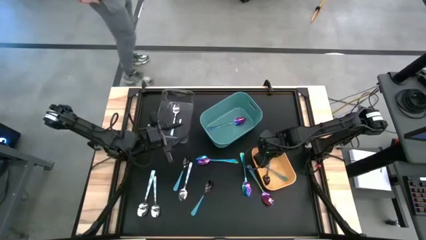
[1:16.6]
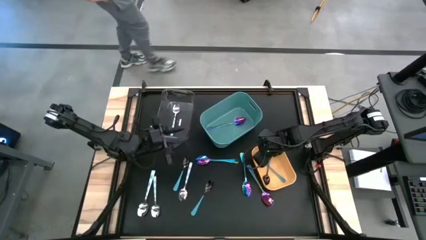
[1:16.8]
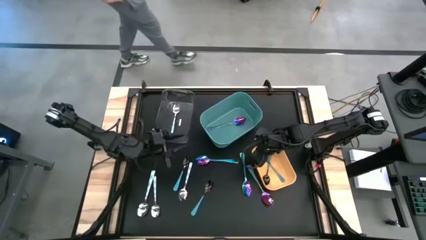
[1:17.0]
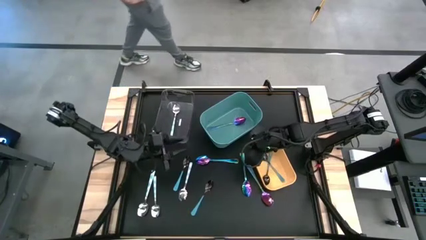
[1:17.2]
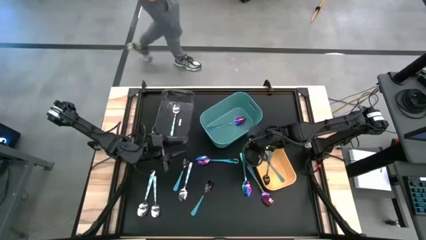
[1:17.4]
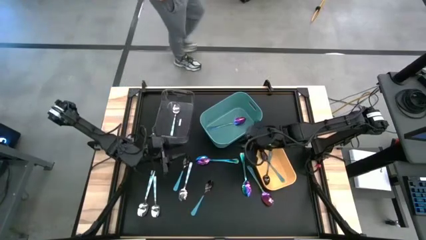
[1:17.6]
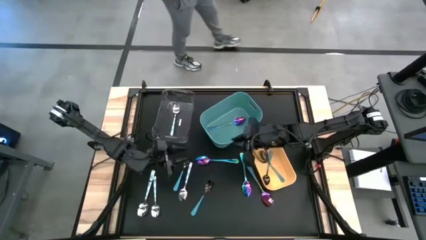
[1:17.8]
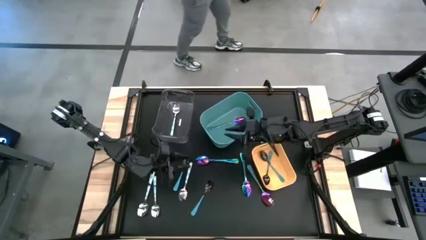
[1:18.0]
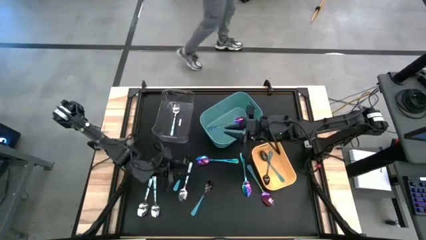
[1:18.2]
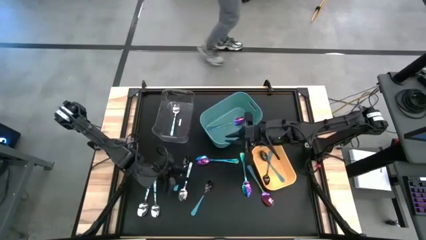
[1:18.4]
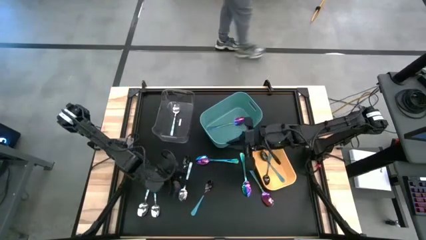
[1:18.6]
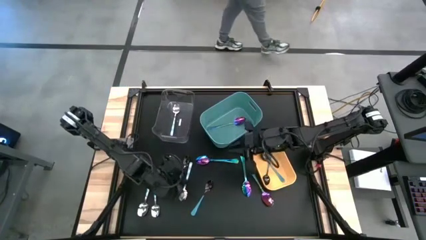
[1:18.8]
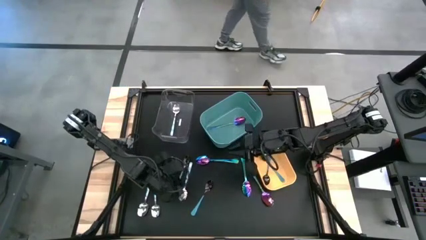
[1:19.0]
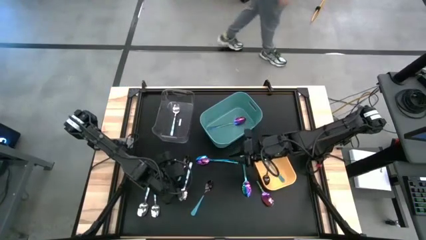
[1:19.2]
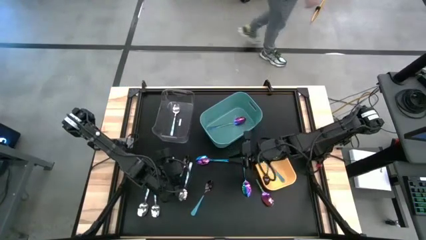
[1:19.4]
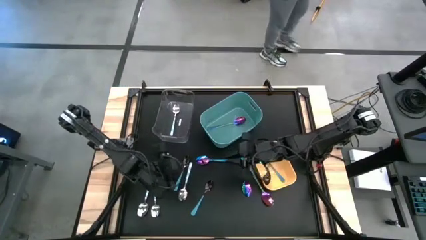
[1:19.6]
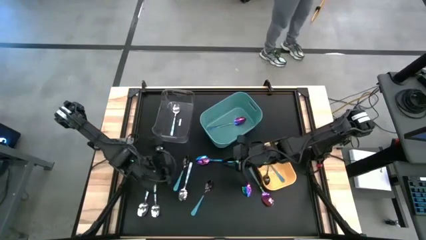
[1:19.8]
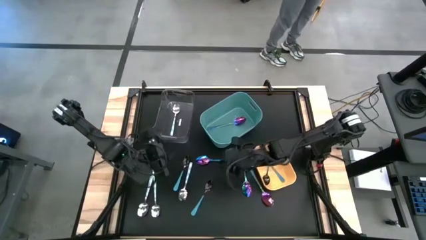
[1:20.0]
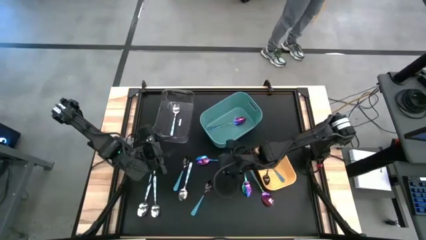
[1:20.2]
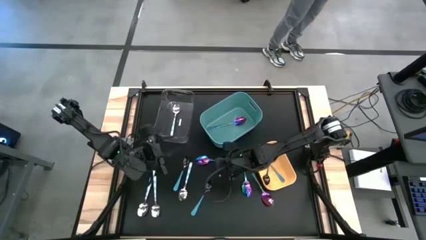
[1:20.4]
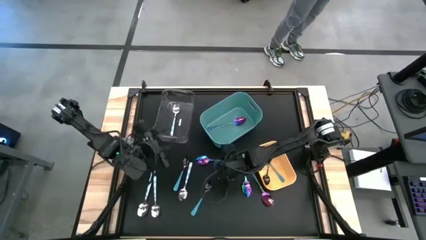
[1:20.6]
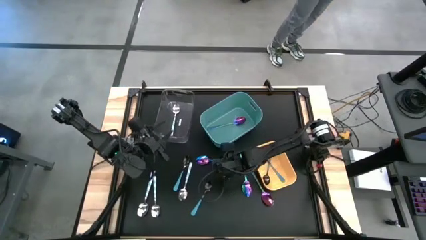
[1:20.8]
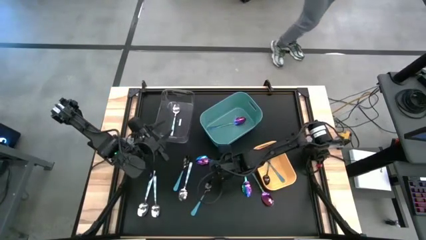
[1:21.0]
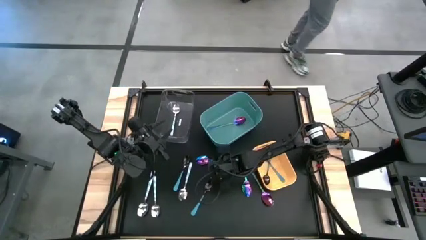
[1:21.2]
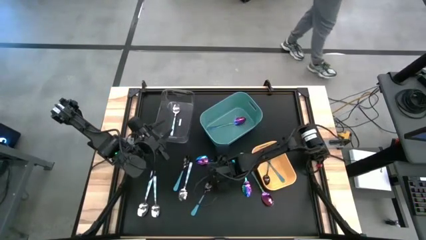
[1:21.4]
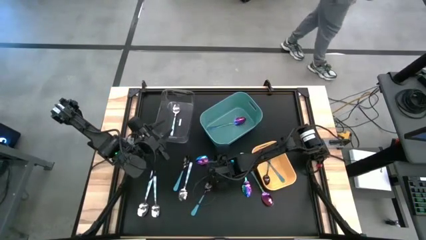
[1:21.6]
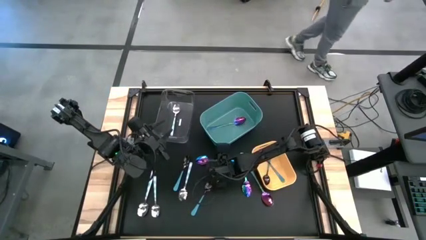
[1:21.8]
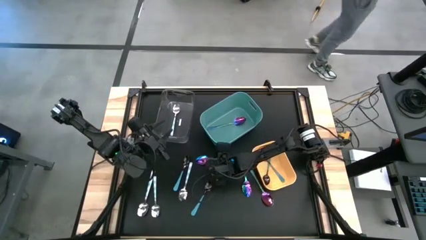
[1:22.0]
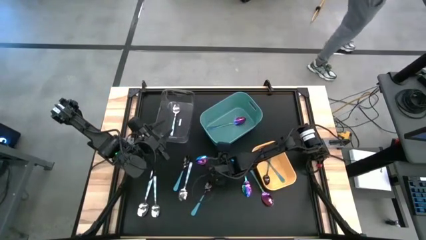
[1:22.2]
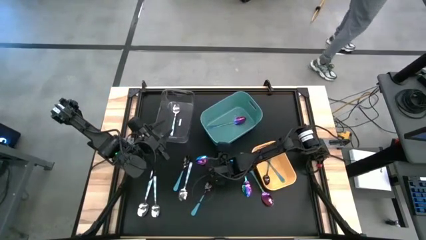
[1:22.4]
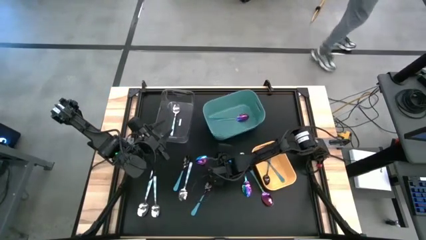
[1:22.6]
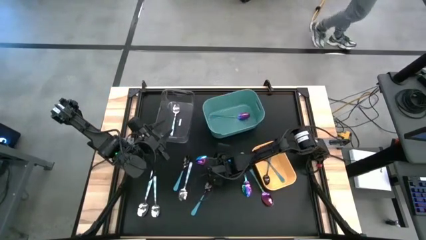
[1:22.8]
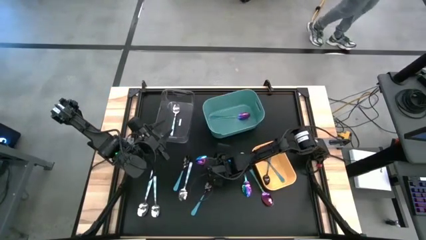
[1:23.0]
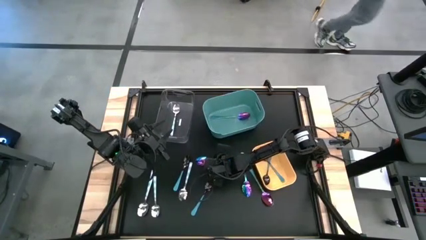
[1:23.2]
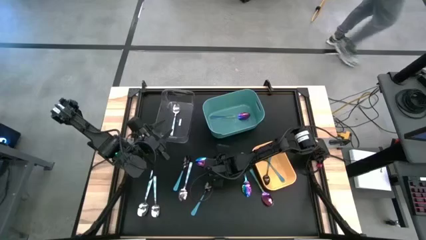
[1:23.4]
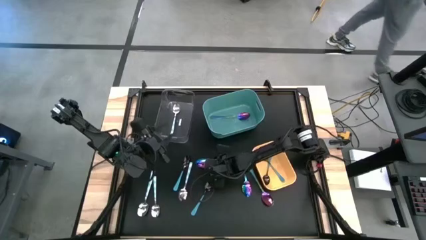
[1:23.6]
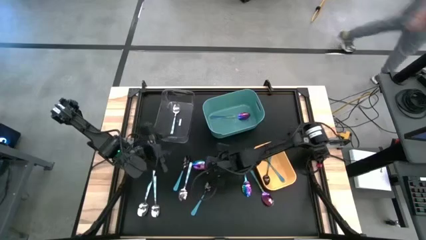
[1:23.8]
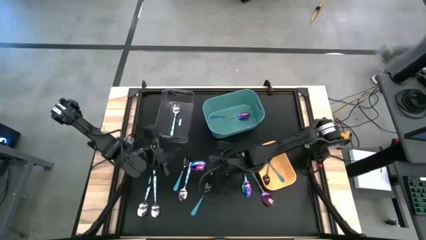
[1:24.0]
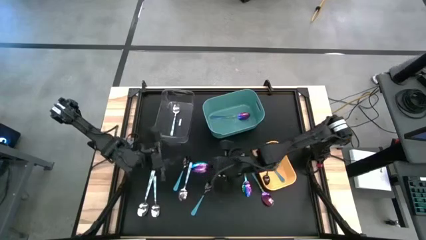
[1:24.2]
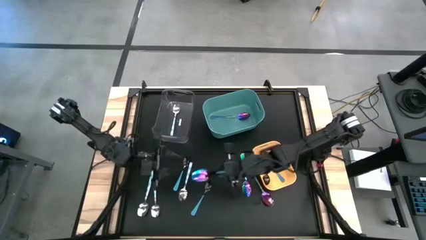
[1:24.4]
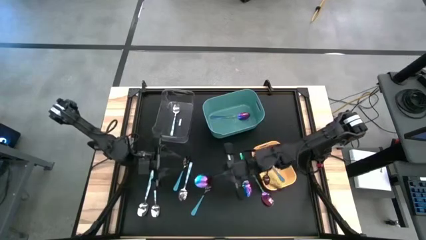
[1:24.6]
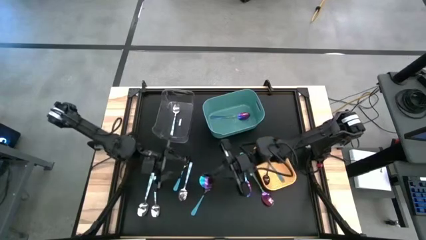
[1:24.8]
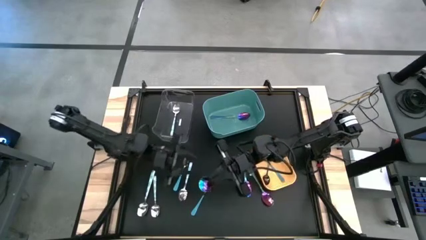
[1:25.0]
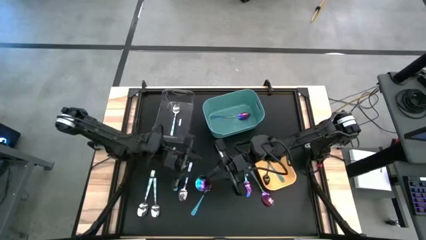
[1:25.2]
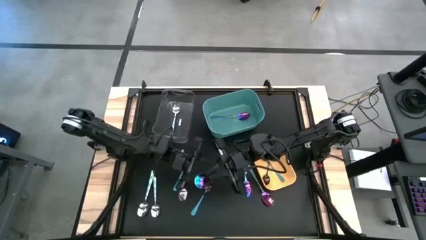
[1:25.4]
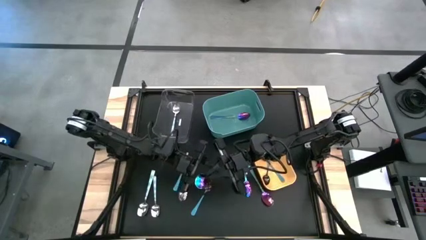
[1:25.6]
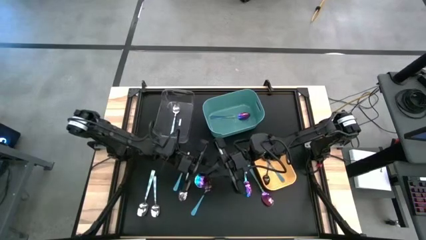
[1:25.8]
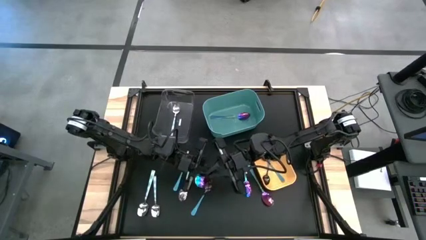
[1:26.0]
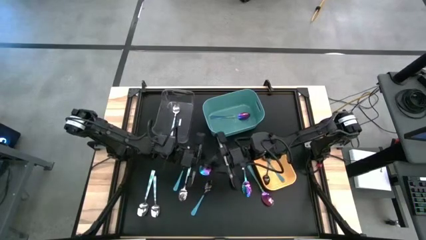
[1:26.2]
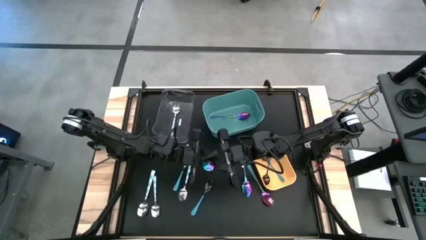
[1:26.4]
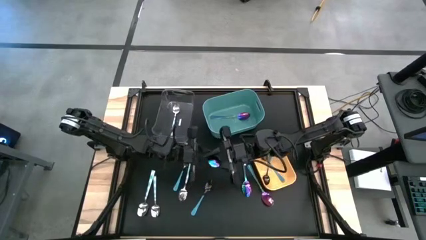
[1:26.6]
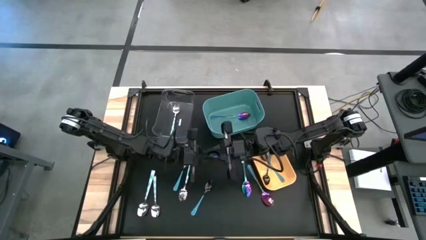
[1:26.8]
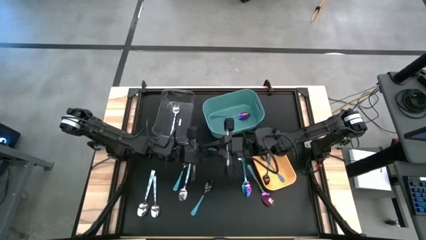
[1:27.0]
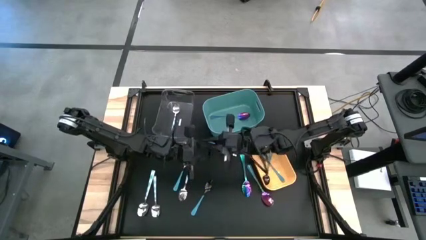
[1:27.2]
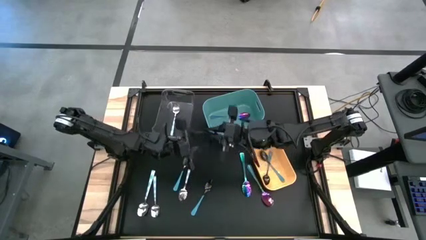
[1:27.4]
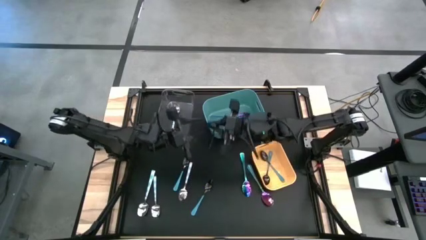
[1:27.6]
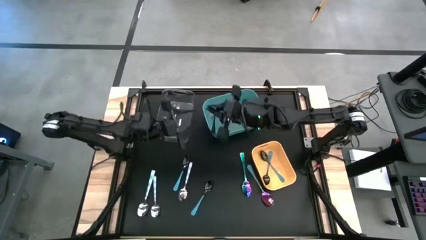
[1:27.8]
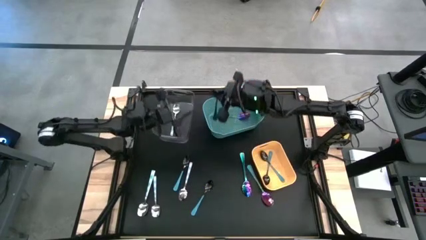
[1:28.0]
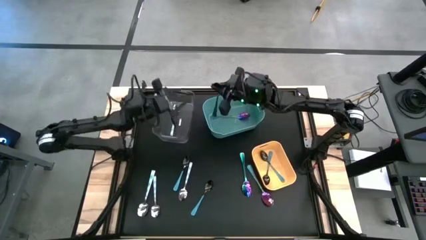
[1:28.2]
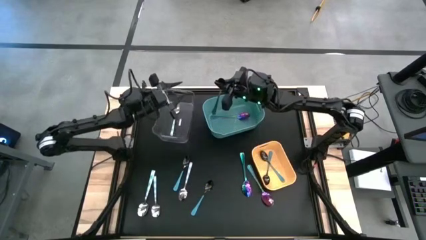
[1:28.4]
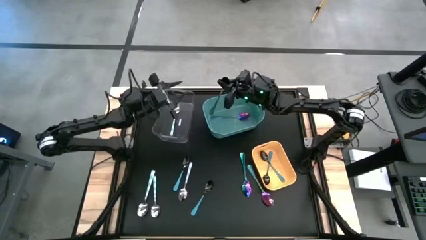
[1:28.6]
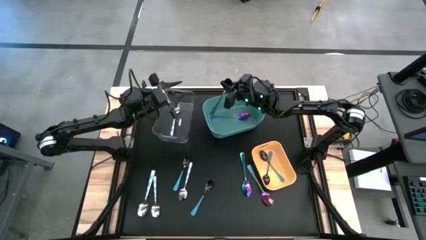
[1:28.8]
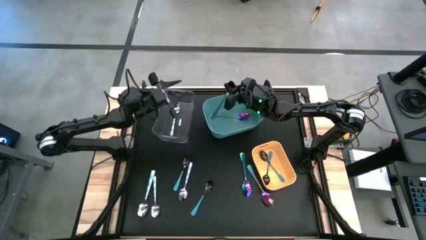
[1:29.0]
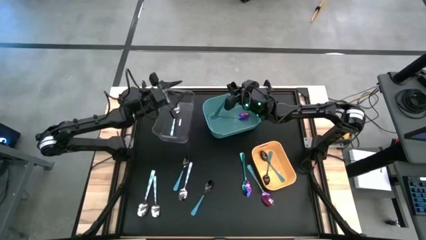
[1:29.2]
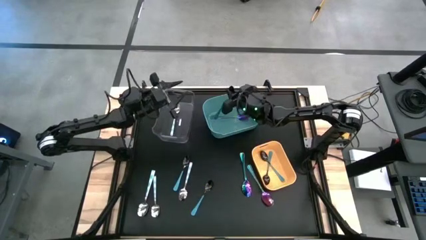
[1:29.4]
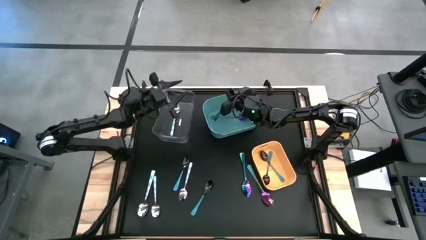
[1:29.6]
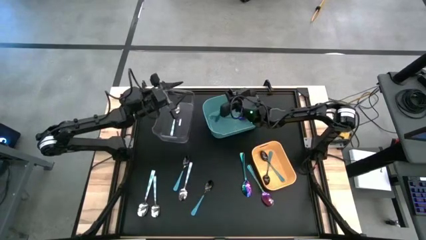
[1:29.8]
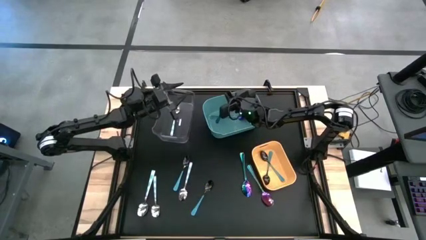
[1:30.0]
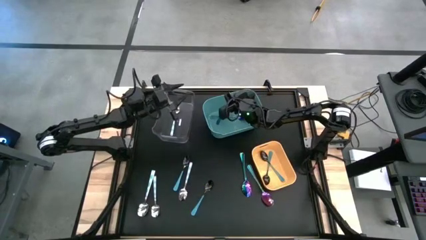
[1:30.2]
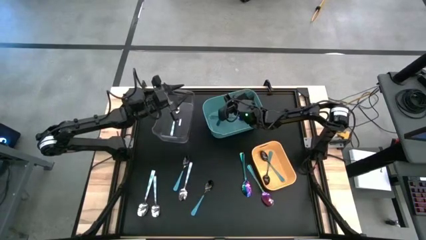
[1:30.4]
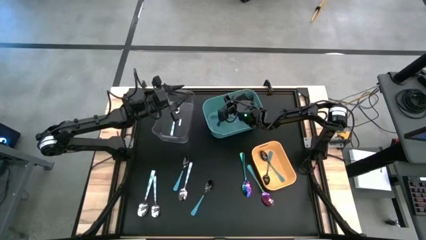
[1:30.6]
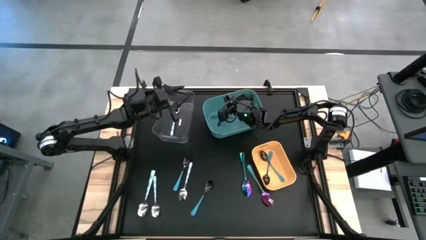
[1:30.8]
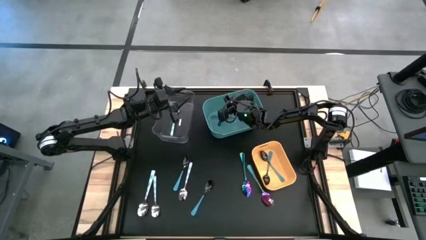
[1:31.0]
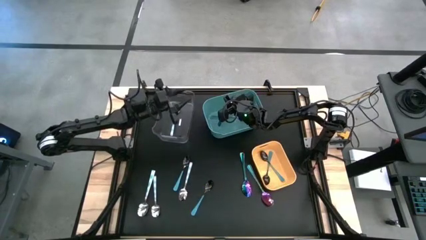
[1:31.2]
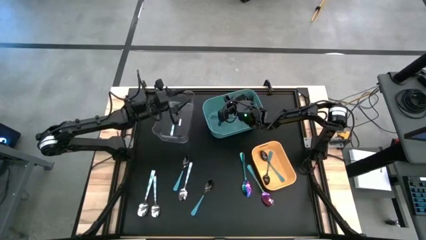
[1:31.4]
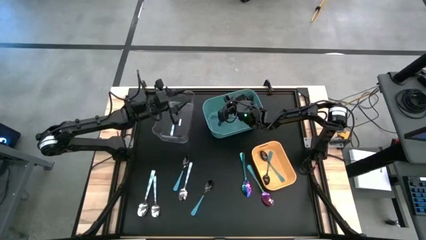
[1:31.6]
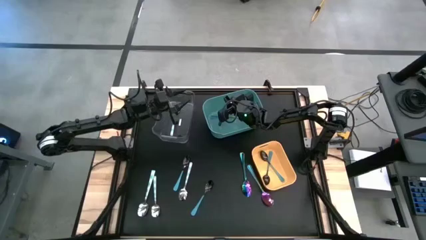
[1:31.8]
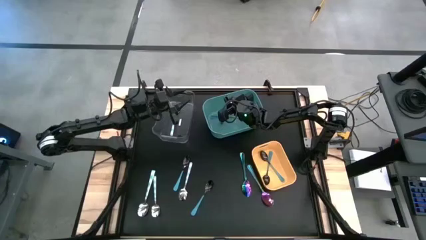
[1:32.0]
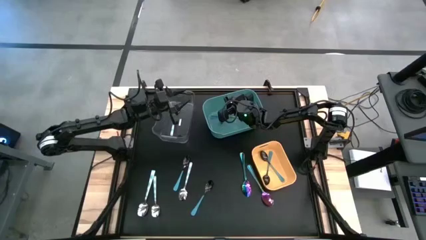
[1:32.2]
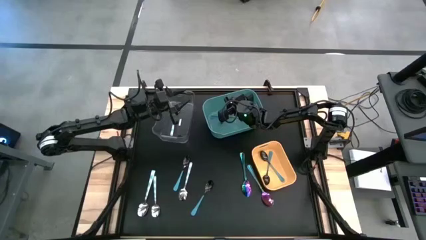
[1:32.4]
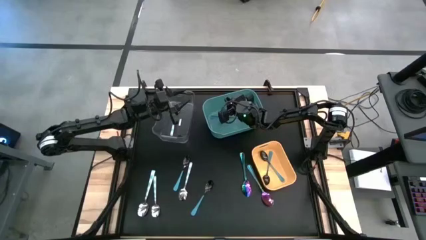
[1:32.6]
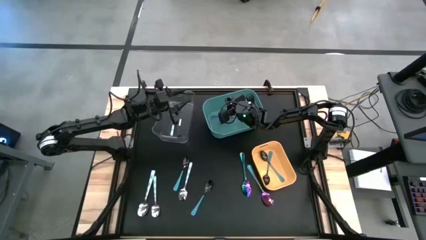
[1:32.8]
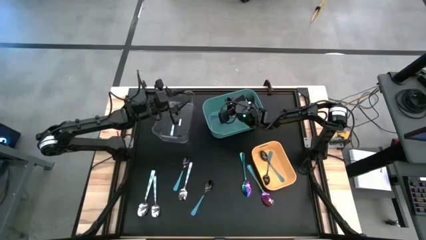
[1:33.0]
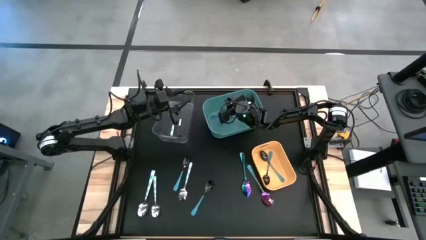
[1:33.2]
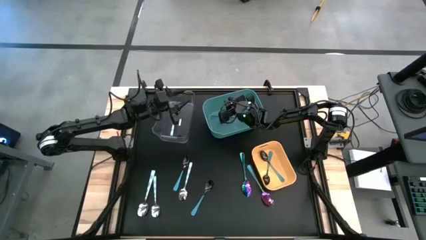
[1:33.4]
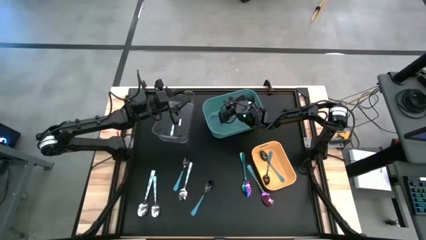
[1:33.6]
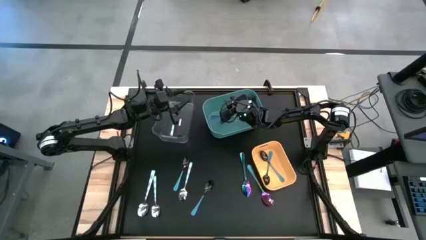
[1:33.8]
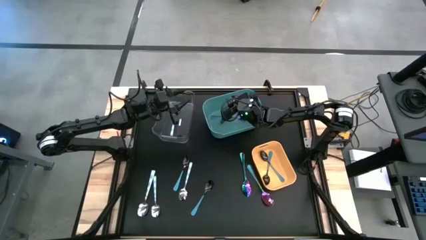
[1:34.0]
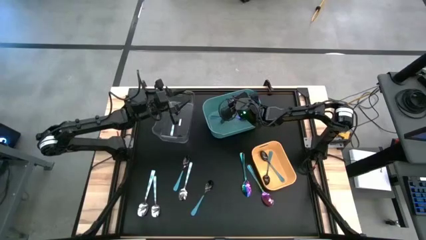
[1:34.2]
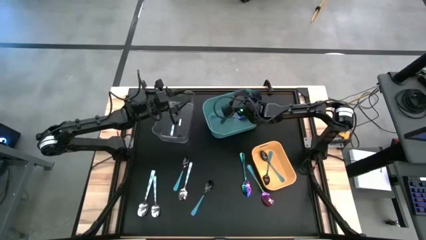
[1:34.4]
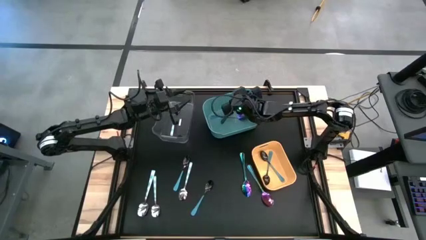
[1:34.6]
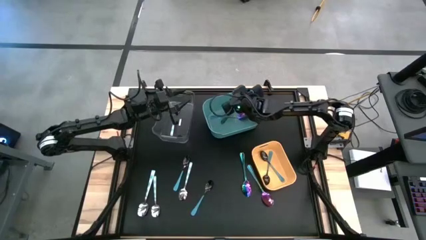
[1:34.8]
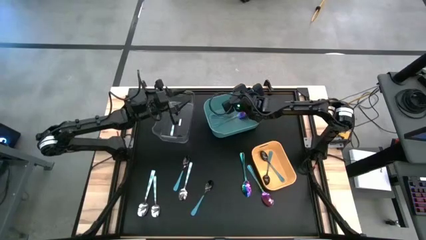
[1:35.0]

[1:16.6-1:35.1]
Task: Sort silverware by color (type)
Put the purple spoon into the green bin
